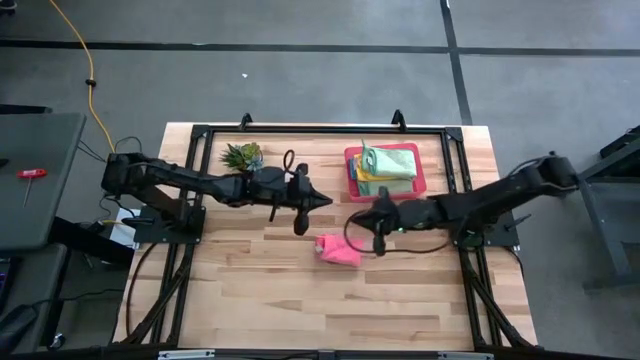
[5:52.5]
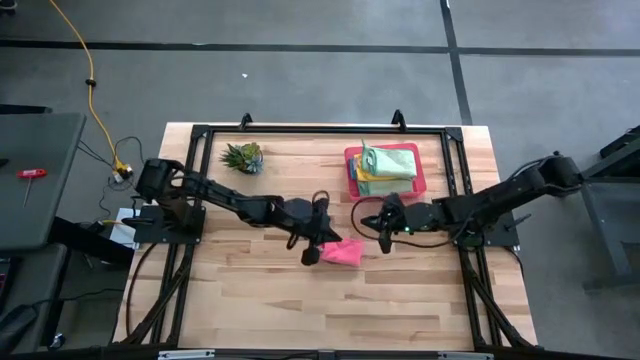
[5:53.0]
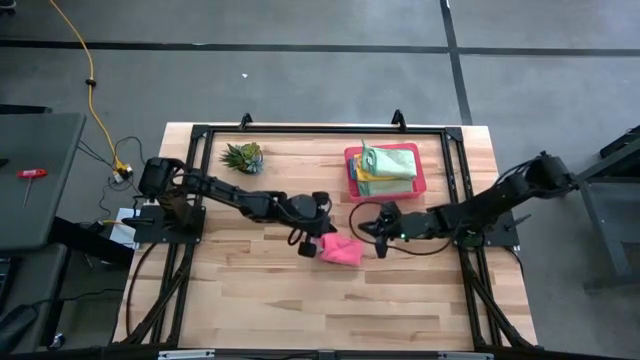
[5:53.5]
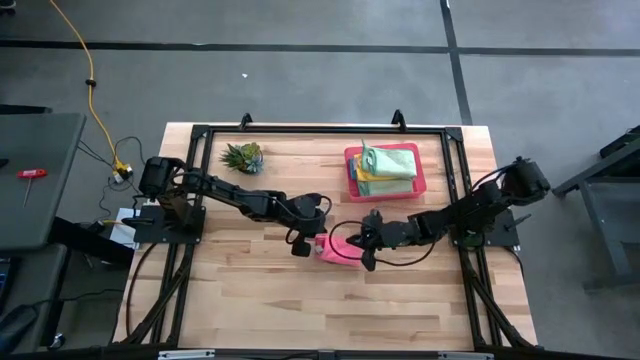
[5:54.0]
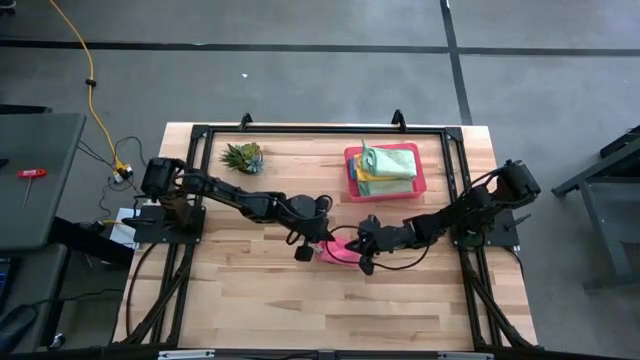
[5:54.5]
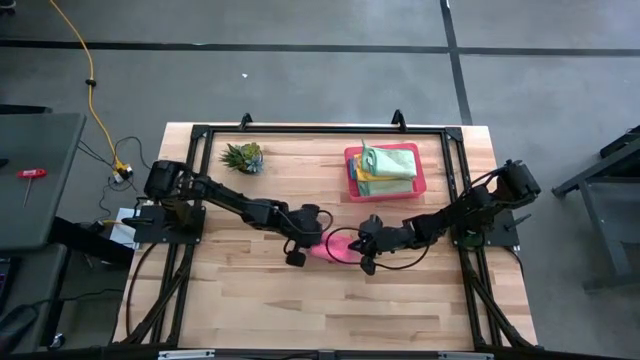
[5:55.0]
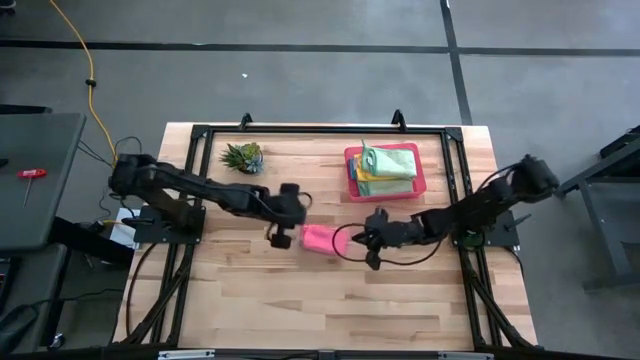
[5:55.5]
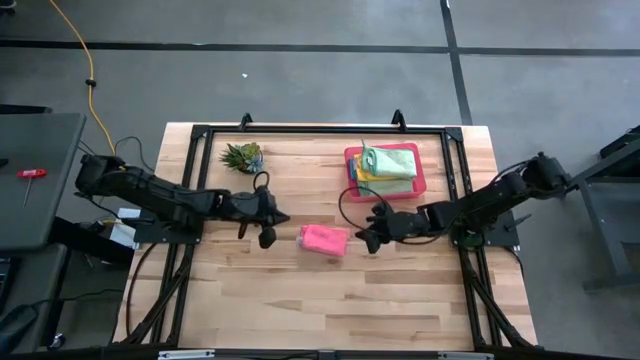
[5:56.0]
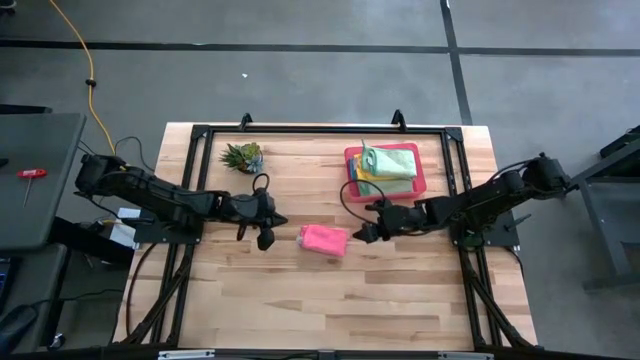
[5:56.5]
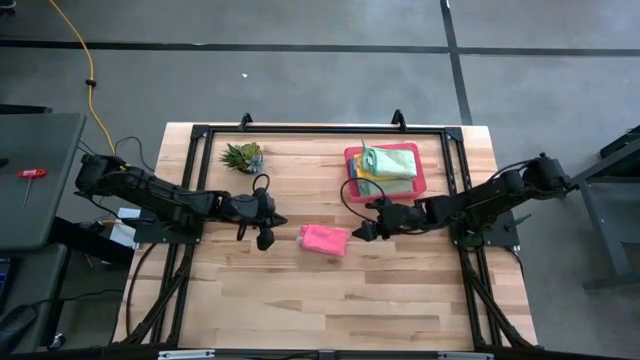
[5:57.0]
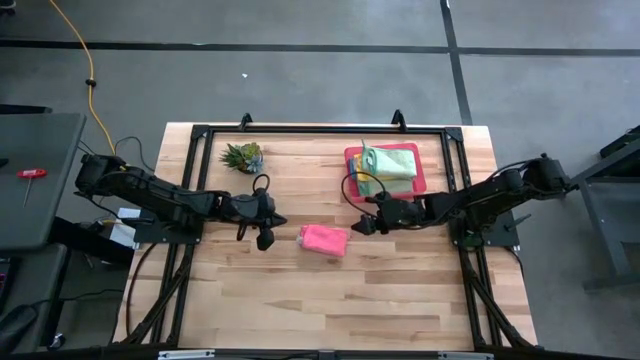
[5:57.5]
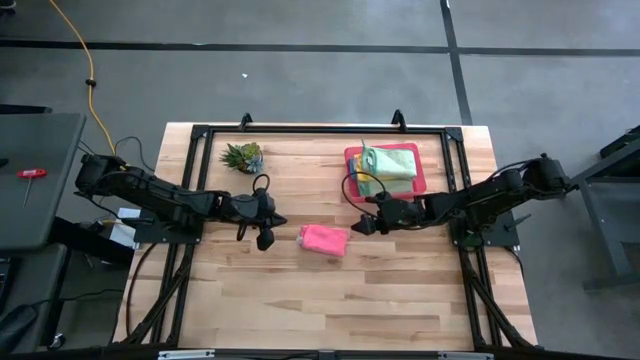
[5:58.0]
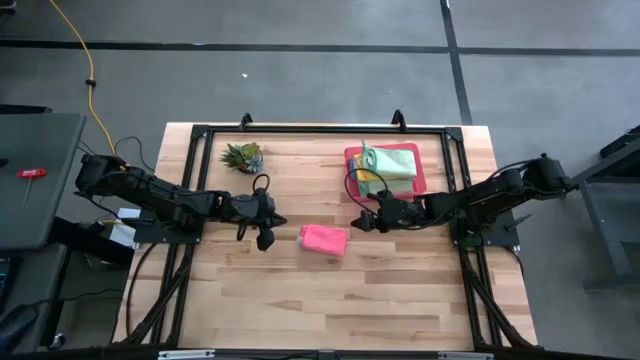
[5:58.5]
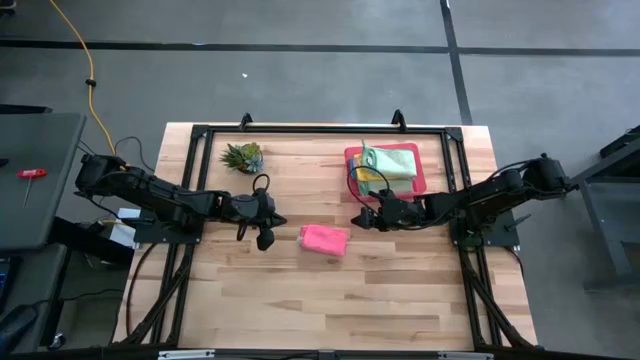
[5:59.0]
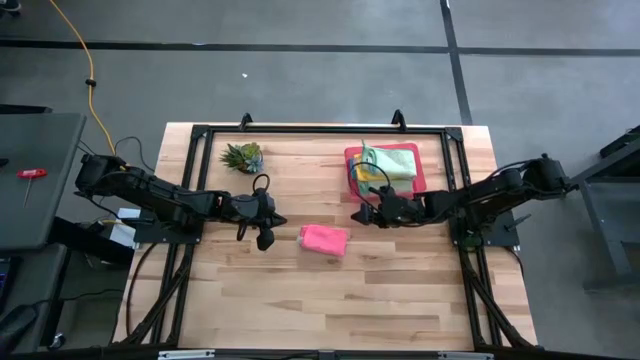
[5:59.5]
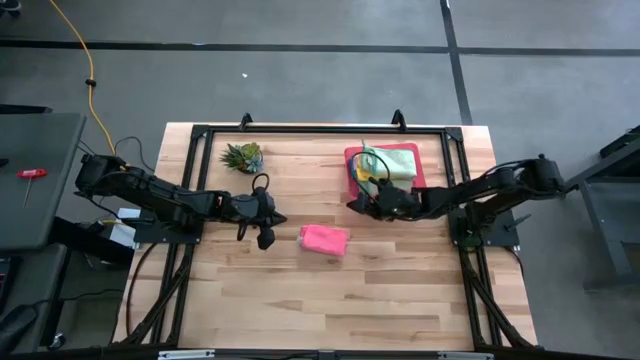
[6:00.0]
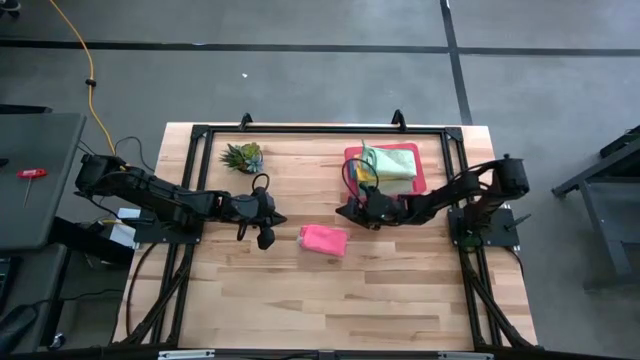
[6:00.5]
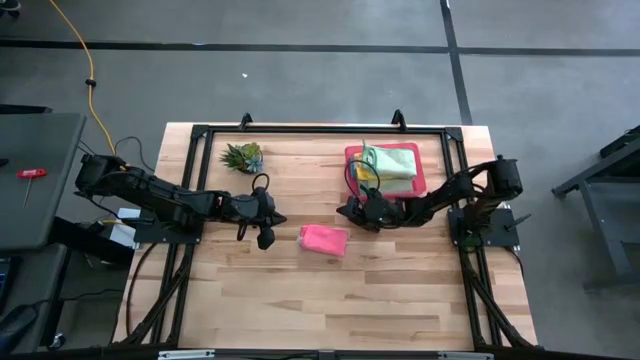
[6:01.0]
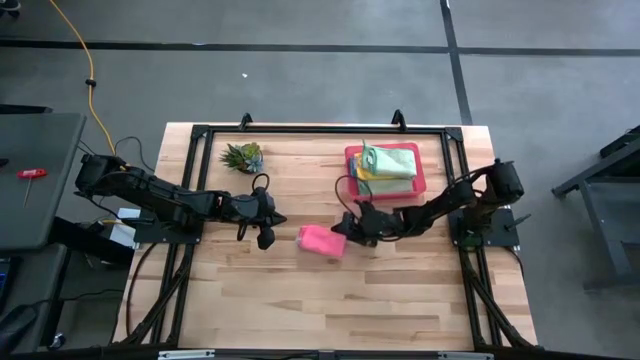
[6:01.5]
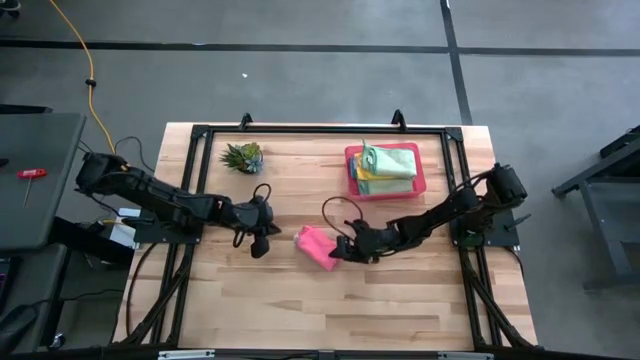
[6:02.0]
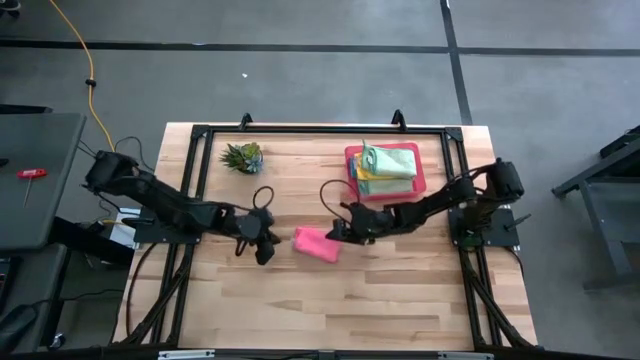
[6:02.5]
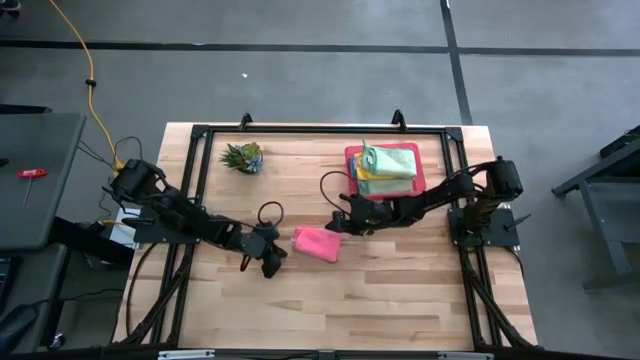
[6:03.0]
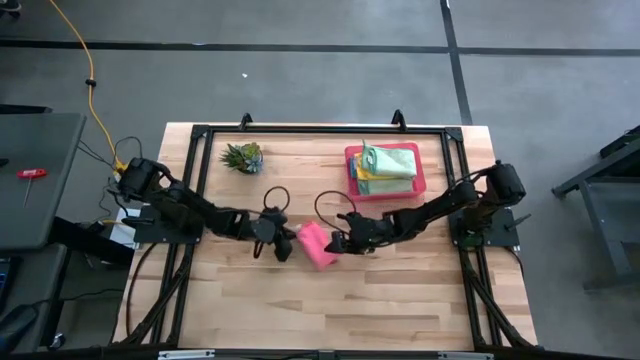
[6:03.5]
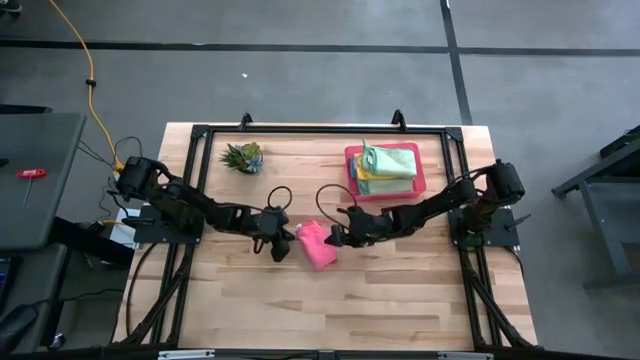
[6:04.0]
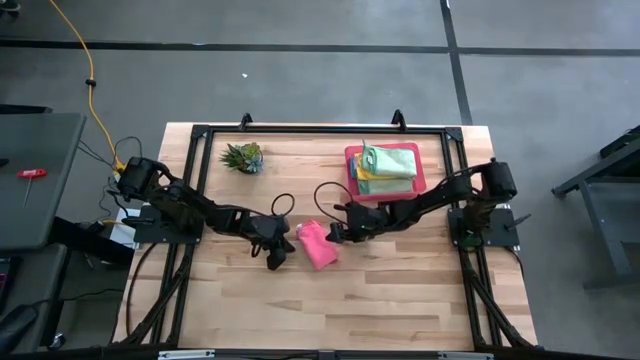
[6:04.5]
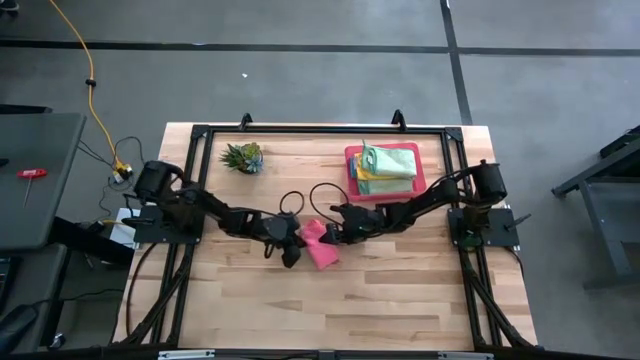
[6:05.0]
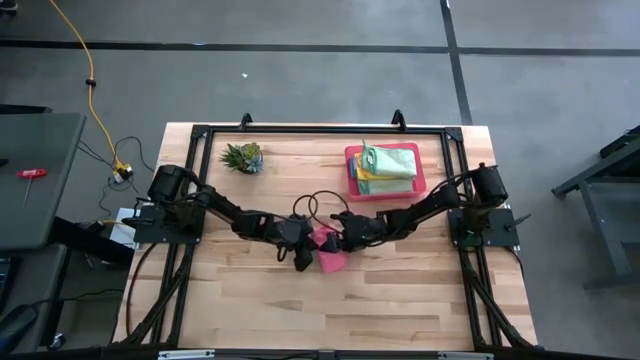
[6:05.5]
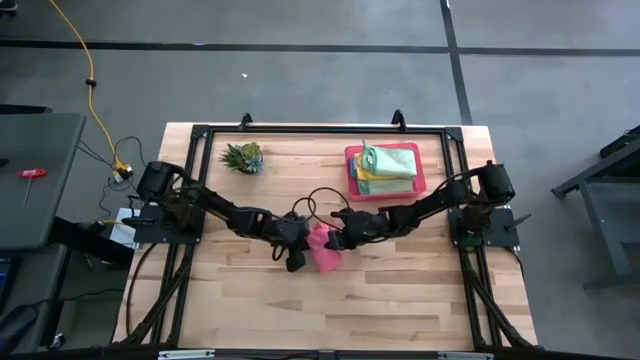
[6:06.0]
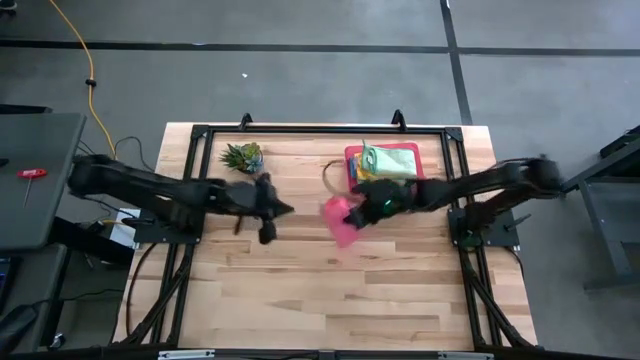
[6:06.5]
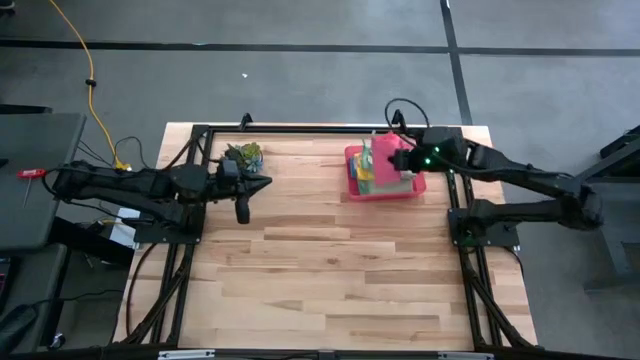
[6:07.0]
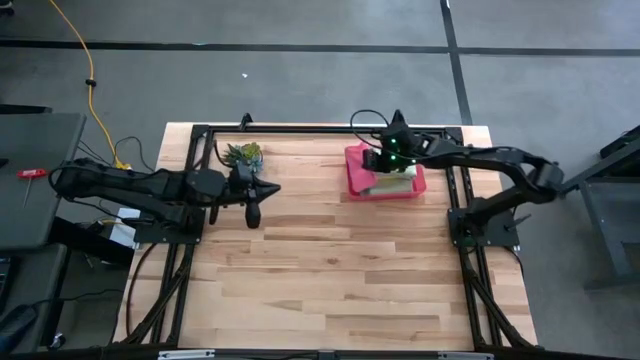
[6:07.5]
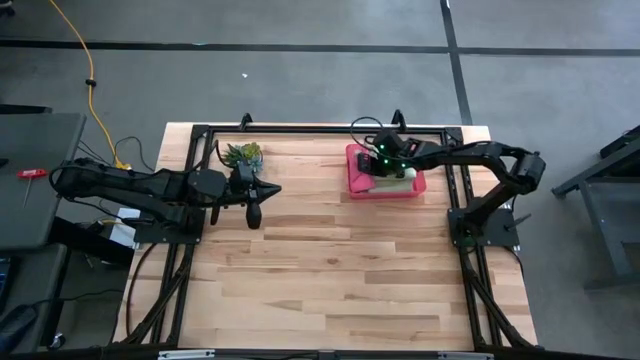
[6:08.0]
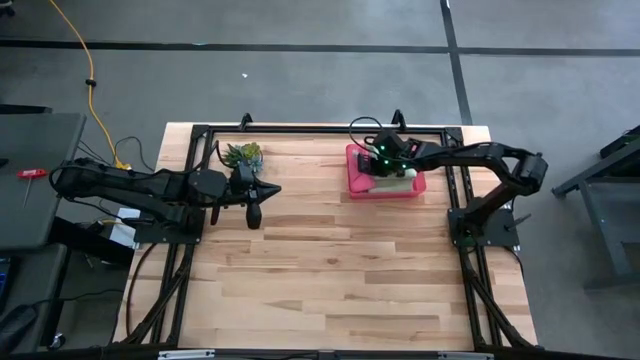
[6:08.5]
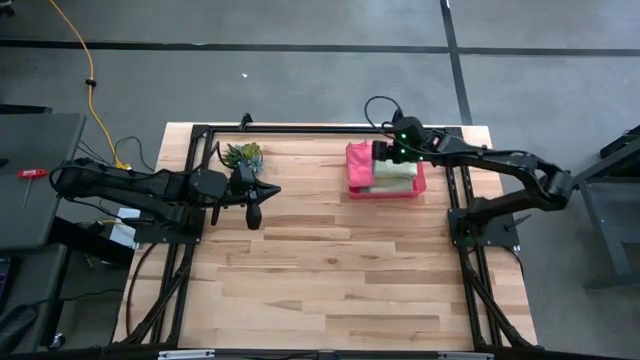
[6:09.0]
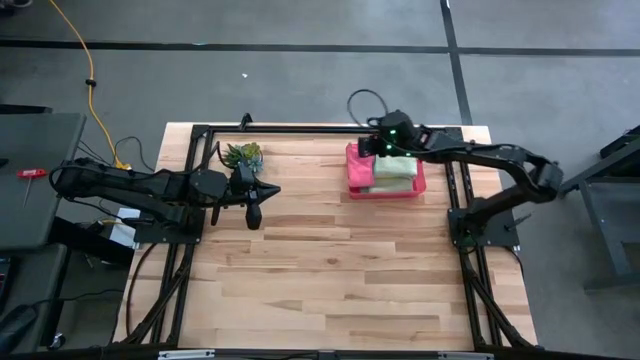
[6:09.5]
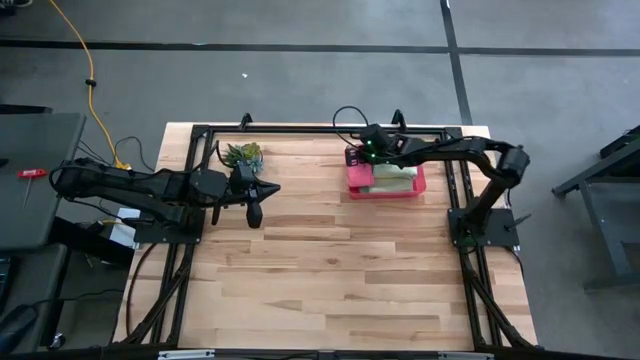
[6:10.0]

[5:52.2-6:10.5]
Task: Fold microfiber towels
Put the folded pink microfiber cloth into the pink bin
